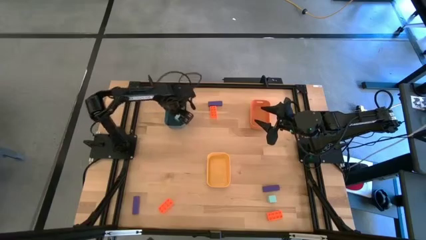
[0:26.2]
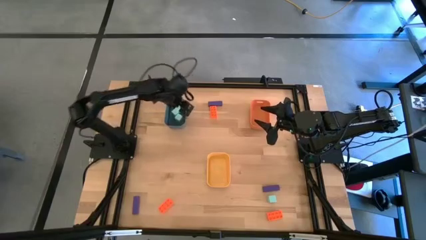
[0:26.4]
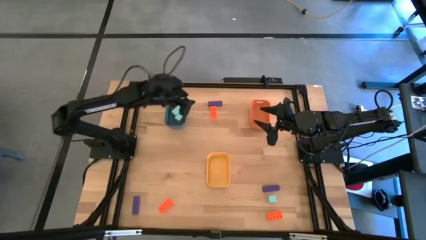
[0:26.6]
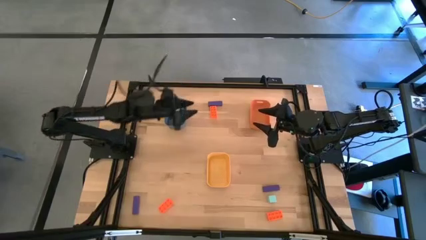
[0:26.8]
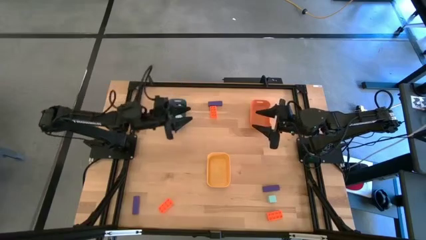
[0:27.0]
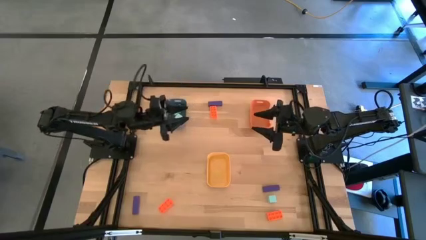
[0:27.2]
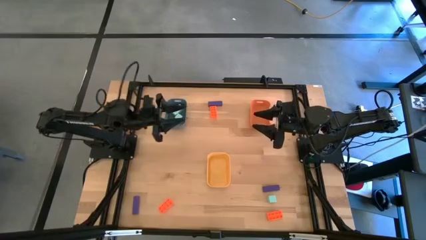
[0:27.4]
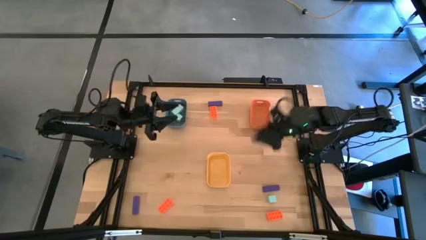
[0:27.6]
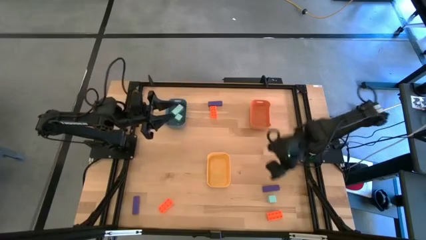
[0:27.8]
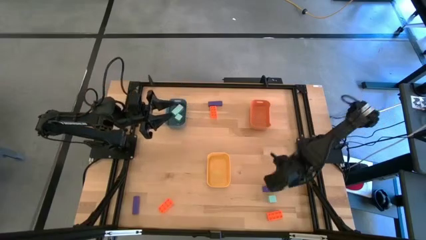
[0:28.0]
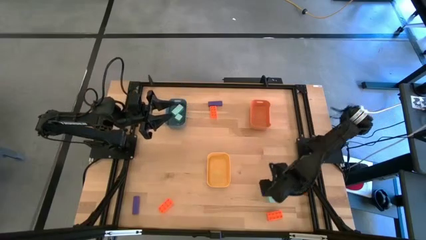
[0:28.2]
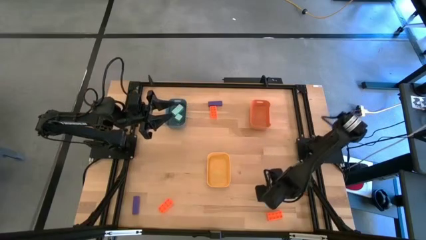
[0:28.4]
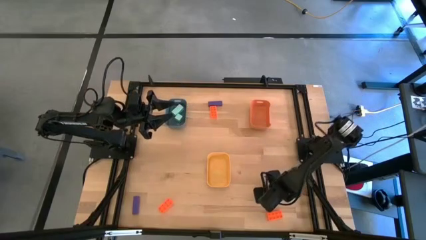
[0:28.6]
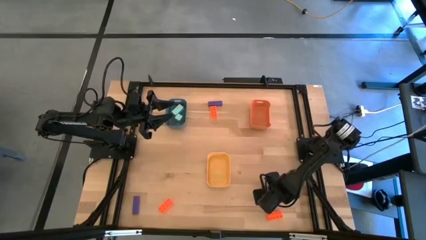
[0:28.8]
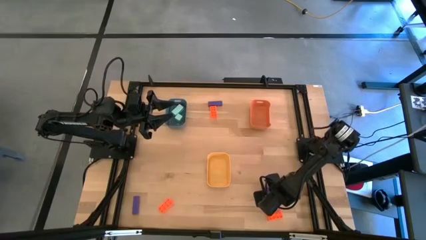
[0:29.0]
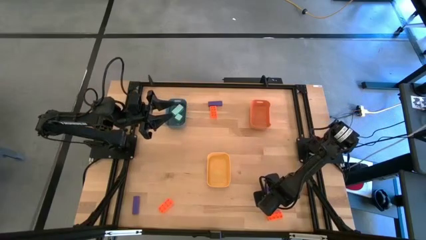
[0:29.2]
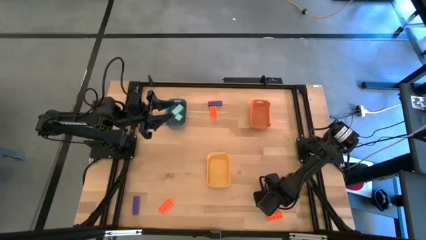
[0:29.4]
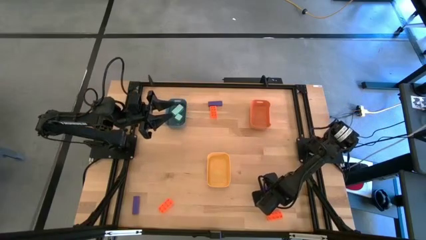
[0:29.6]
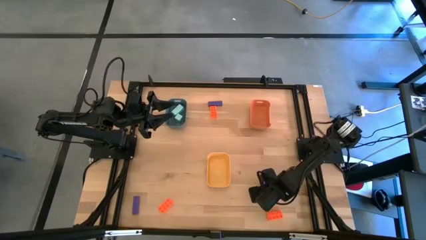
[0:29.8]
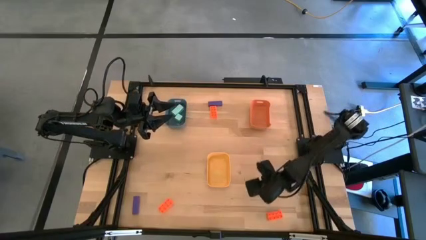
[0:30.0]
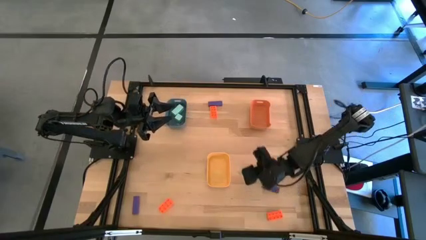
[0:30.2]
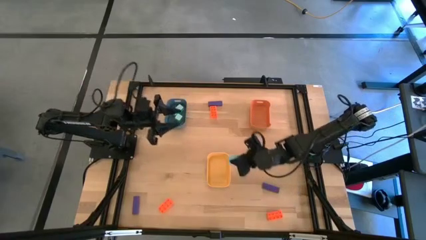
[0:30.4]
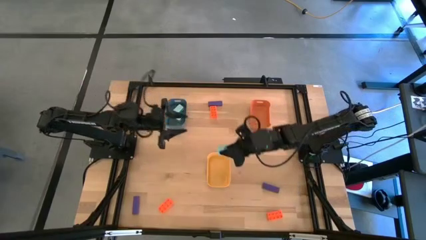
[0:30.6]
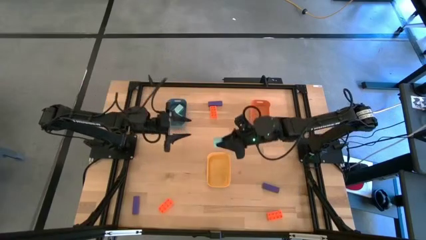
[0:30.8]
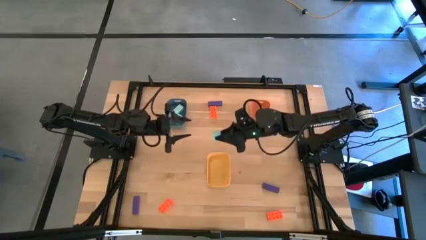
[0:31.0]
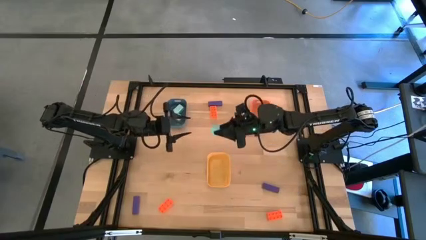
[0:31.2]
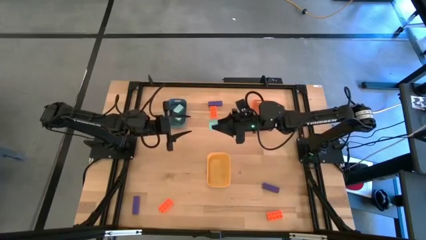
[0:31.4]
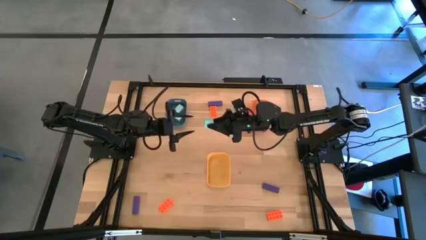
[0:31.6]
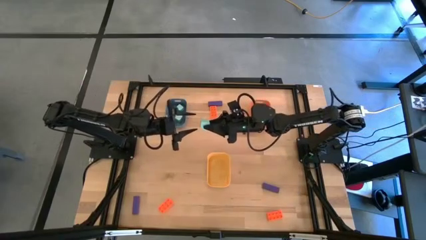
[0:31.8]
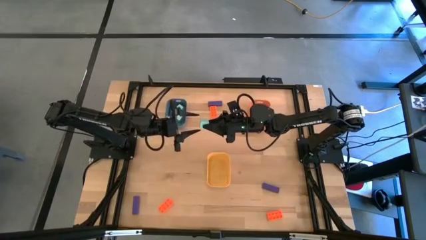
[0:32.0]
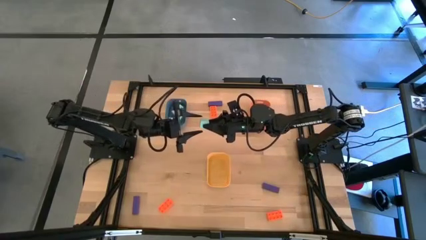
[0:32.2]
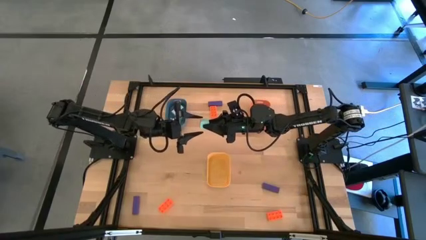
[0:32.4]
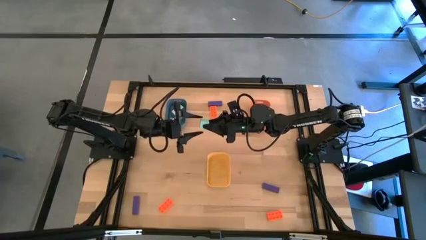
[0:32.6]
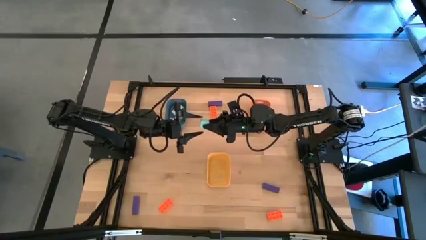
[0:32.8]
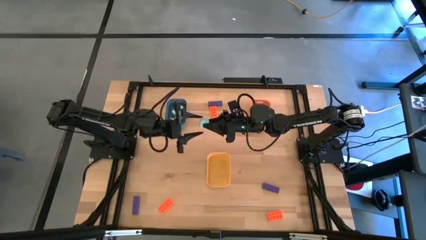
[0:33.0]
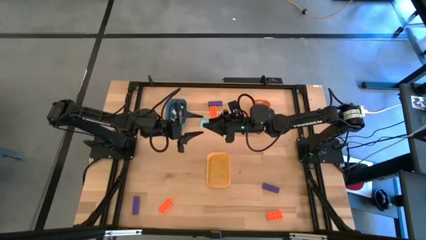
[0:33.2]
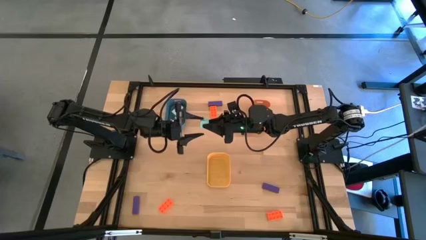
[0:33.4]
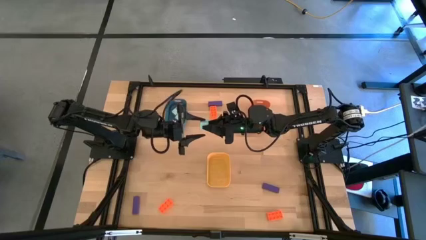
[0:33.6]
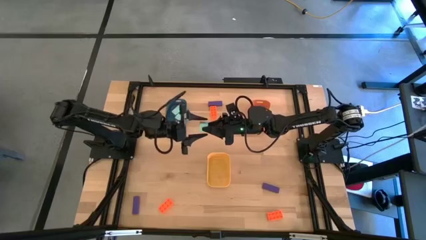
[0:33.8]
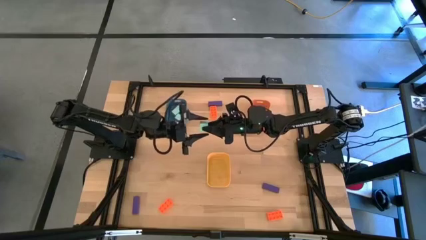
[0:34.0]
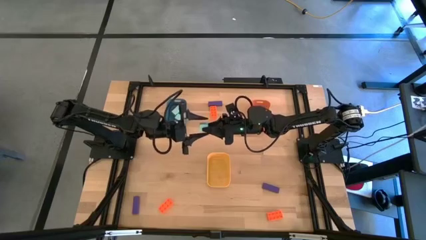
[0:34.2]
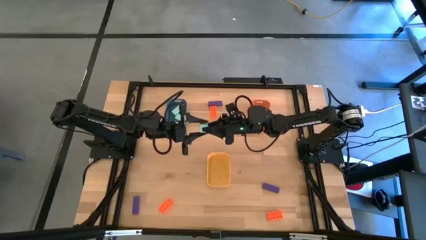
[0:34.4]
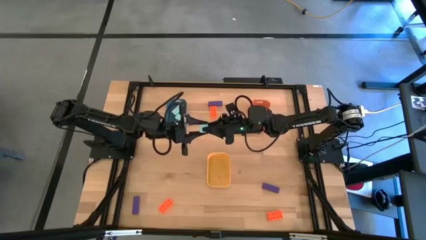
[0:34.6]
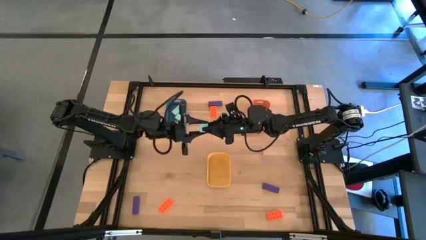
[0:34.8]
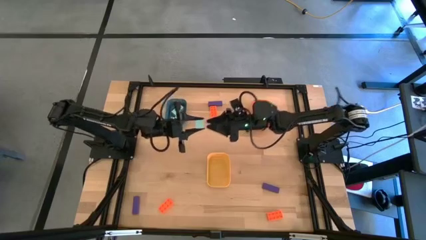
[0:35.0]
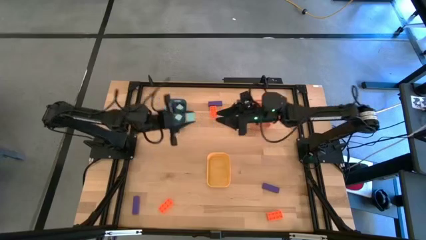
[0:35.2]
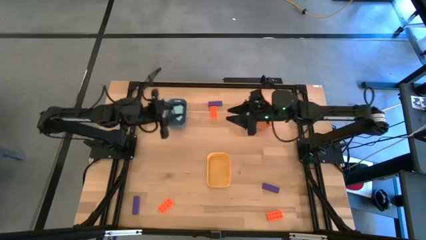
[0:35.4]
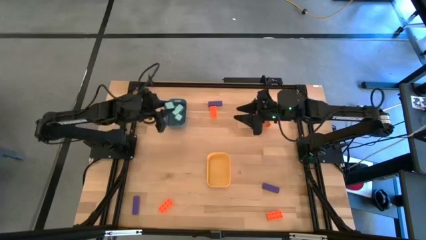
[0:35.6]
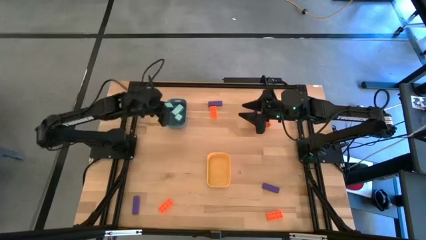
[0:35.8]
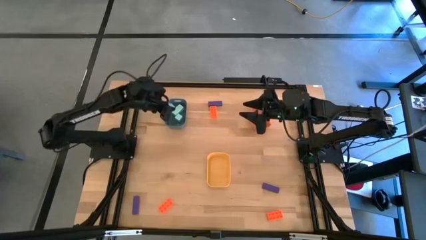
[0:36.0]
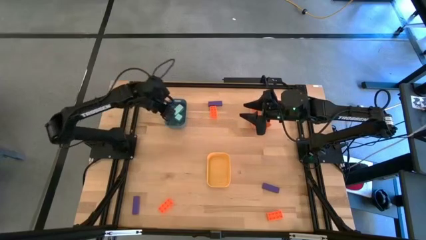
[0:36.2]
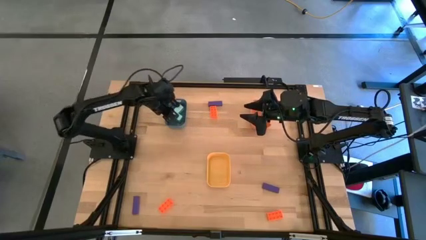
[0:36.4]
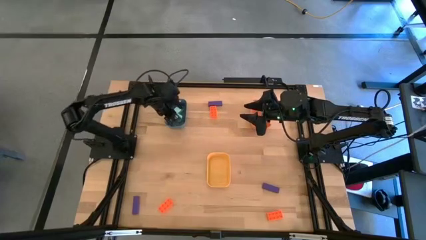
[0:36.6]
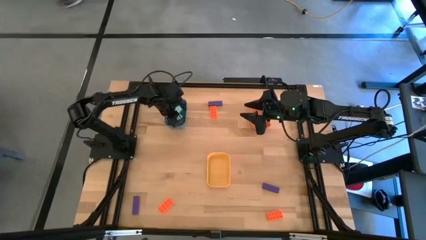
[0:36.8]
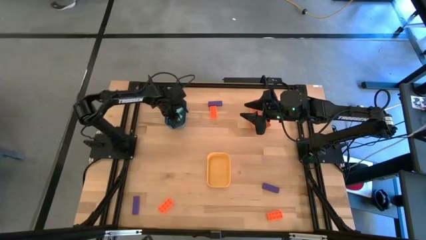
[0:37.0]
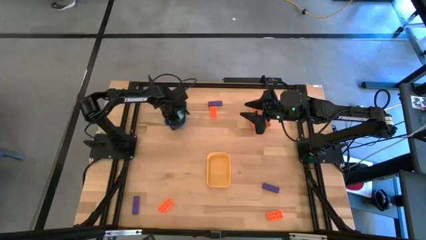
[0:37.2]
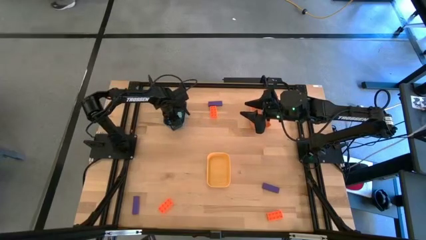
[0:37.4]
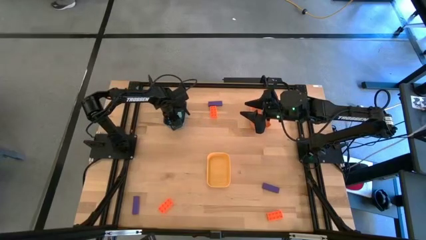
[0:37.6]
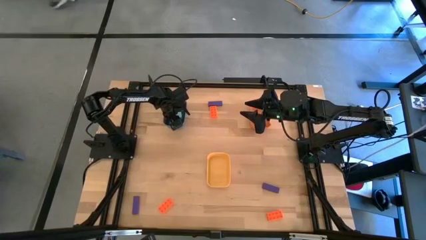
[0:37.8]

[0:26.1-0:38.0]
Task: Sort & place blocks by color
Put the light blue block into the blue bin

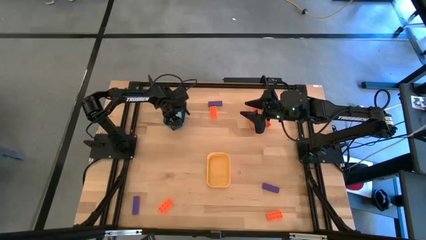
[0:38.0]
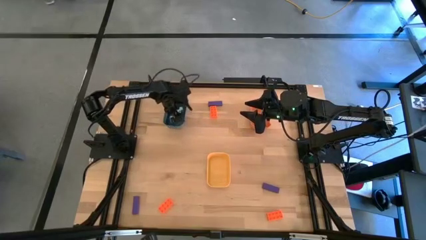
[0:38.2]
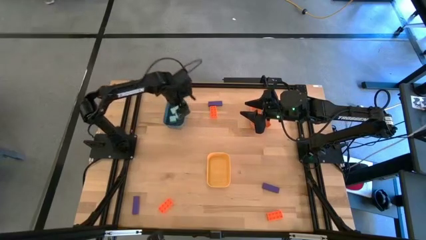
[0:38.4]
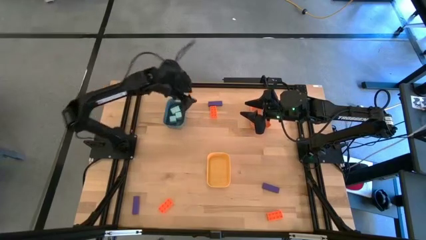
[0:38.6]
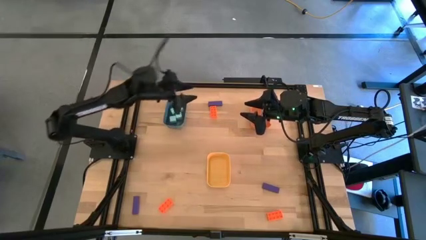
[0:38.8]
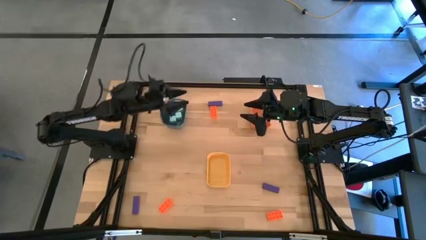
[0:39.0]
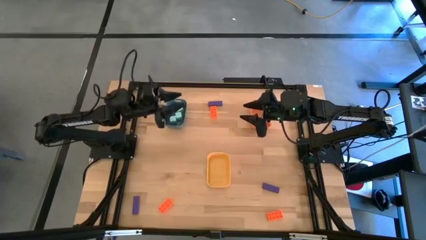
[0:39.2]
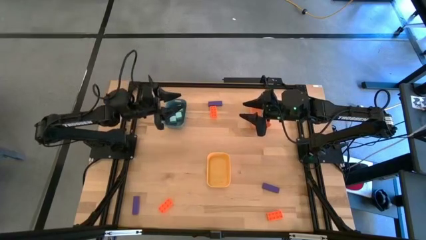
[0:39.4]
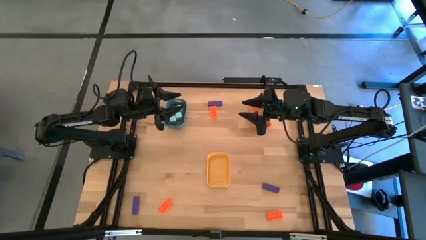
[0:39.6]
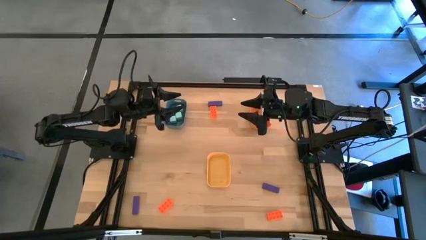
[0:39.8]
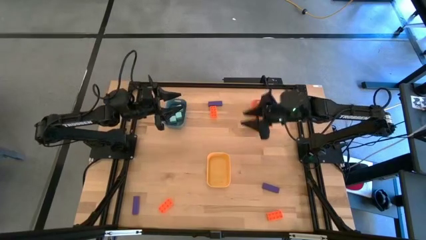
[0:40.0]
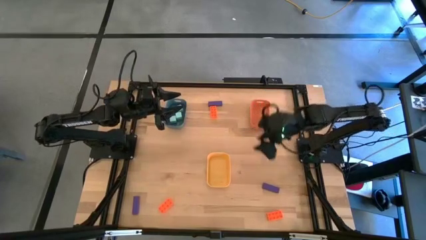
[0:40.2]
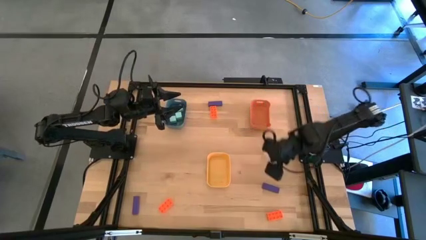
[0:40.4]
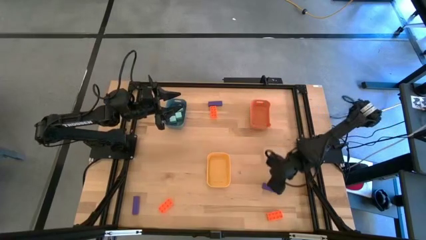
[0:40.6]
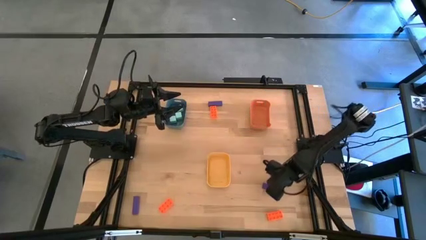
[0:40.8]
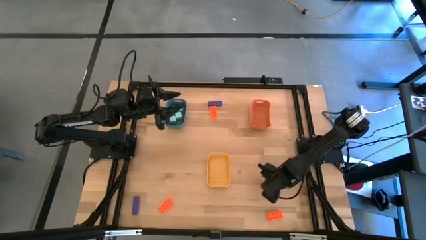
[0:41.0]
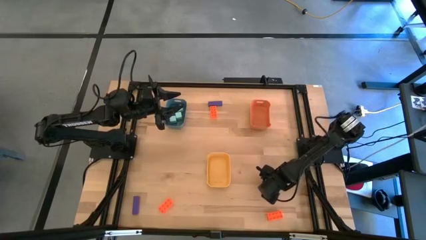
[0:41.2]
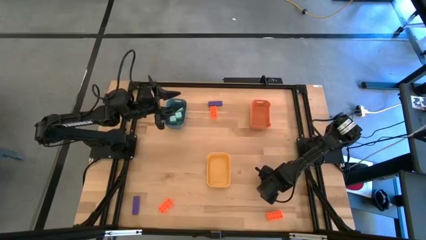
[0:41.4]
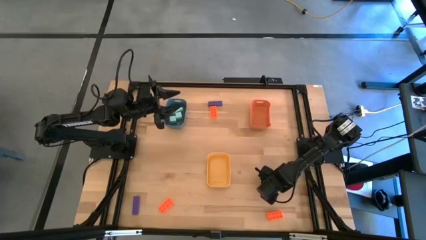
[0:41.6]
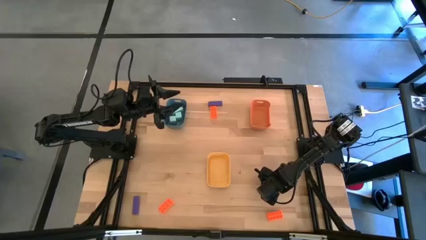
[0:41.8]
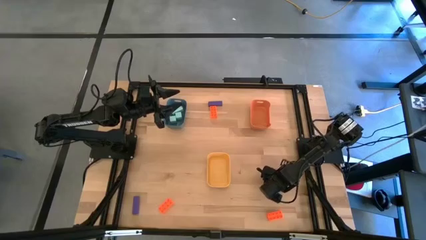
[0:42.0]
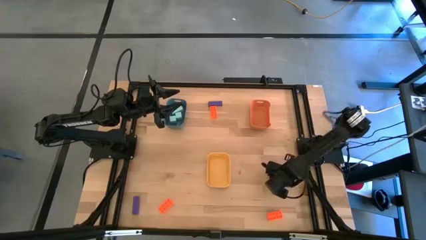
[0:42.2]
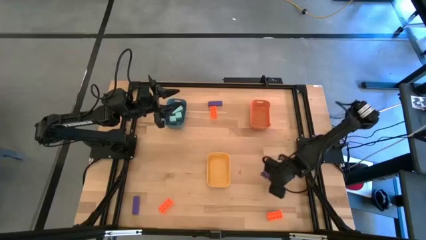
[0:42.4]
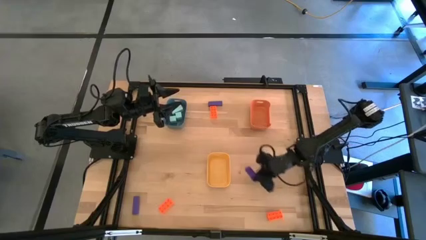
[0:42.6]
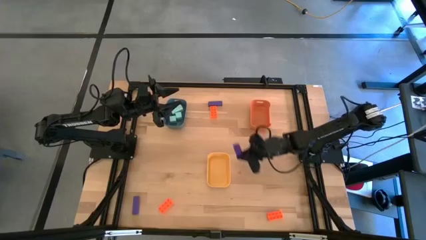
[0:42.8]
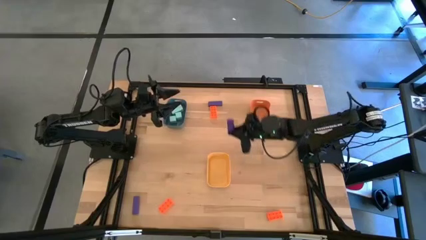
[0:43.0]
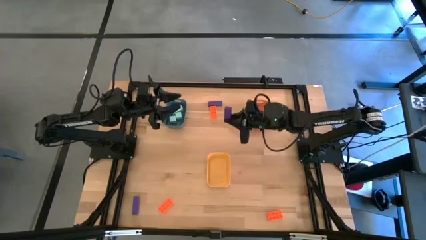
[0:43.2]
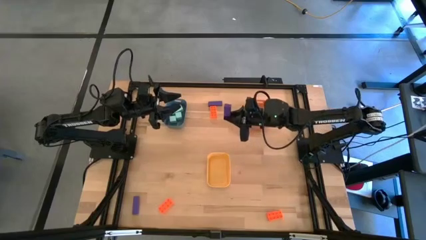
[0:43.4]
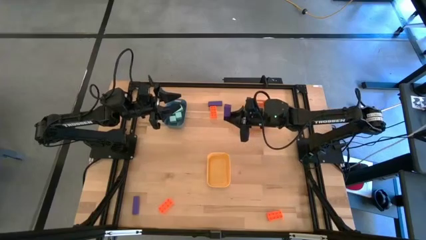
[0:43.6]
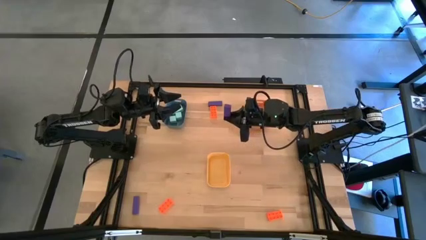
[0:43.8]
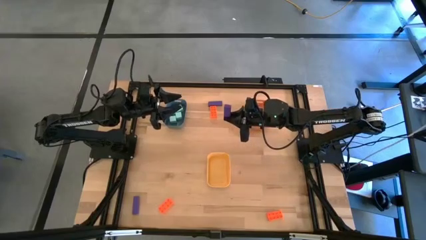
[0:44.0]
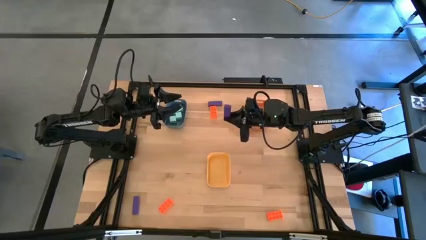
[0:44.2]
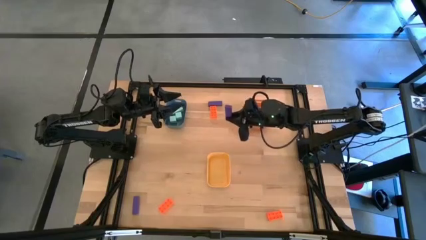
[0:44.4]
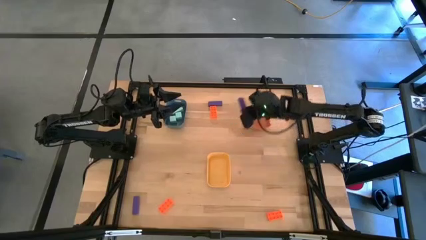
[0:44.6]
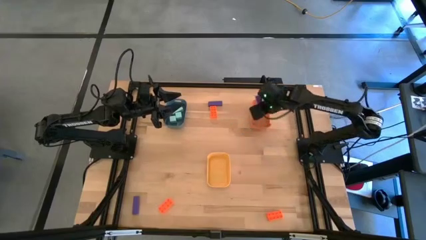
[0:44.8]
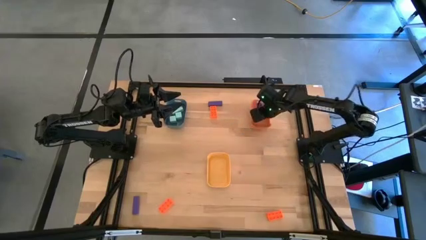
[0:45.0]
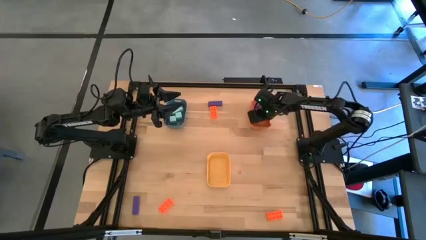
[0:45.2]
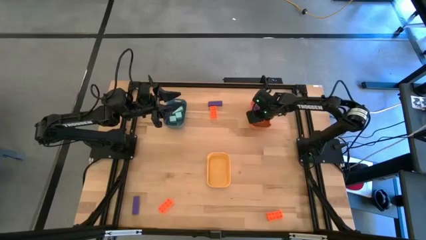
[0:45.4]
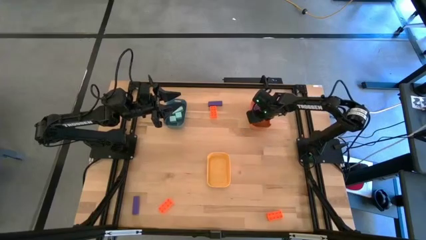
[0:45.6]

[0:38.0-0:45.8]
Put the bottom right purple block into the orange bin
